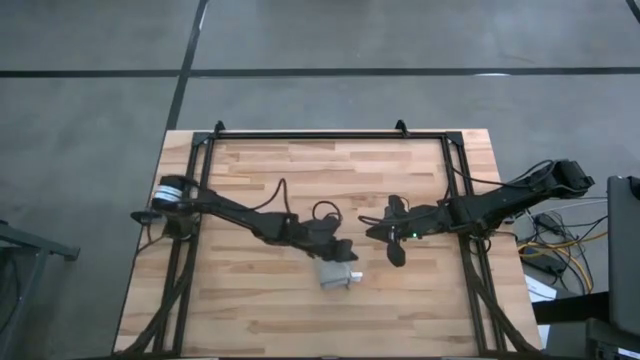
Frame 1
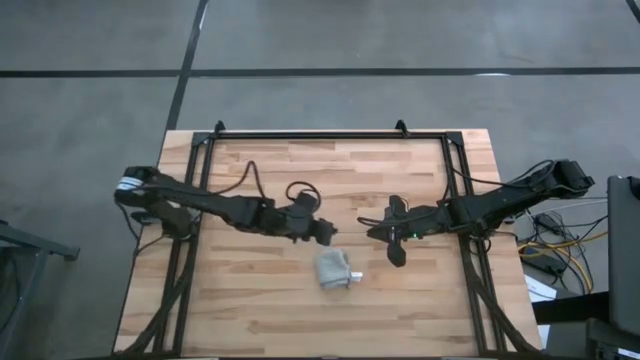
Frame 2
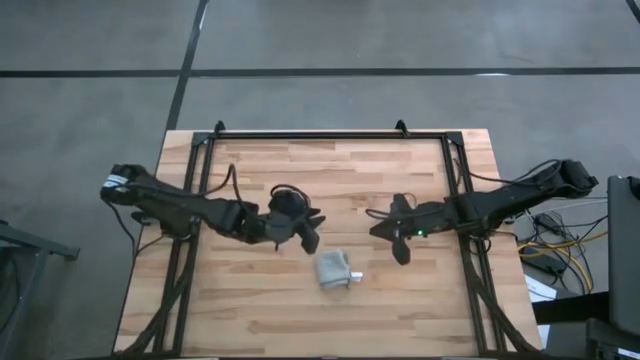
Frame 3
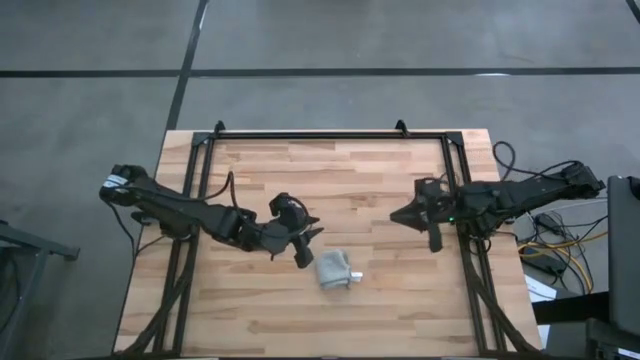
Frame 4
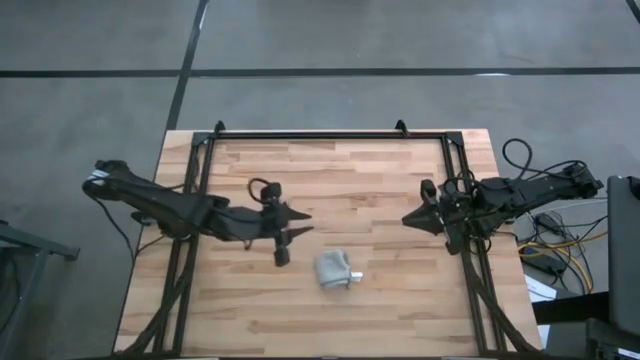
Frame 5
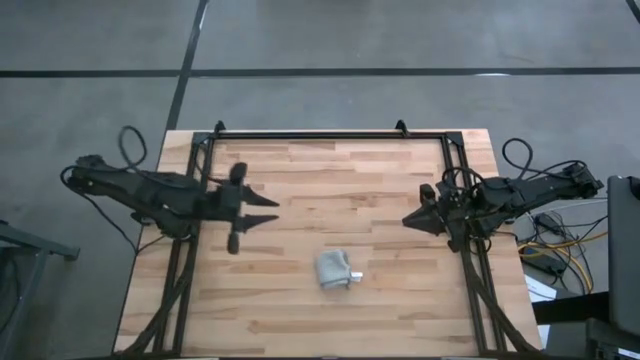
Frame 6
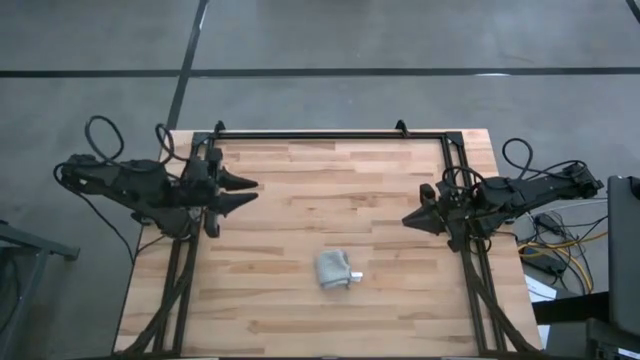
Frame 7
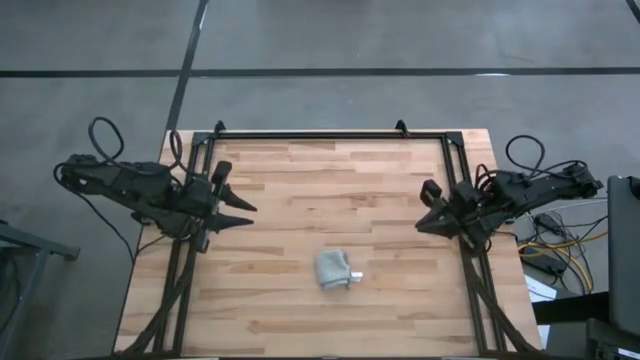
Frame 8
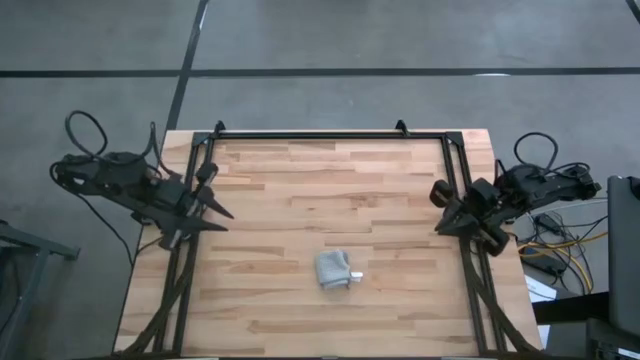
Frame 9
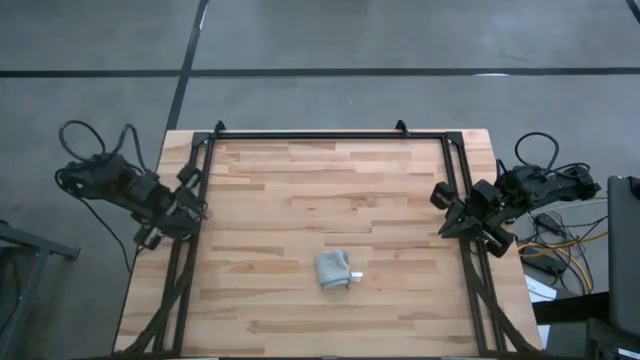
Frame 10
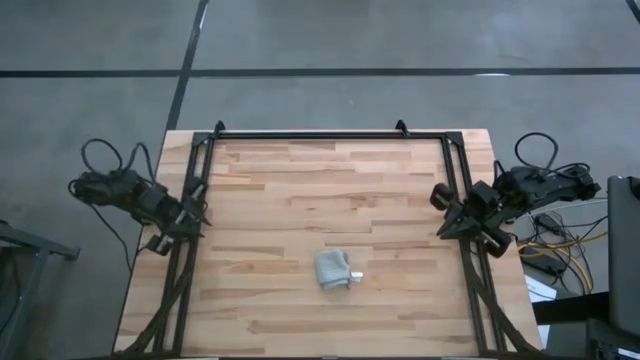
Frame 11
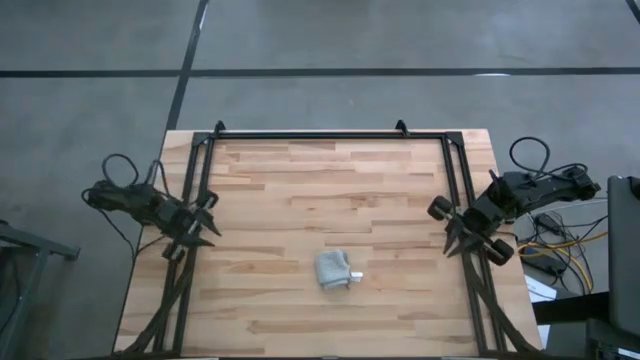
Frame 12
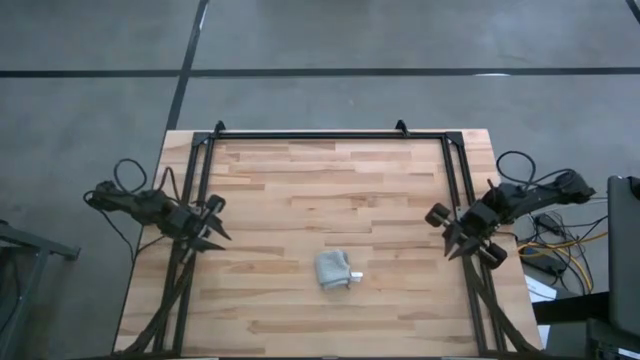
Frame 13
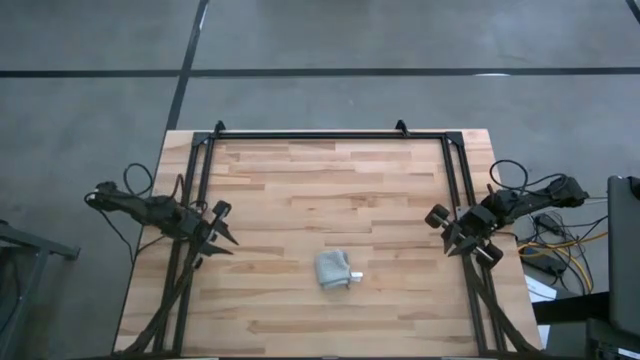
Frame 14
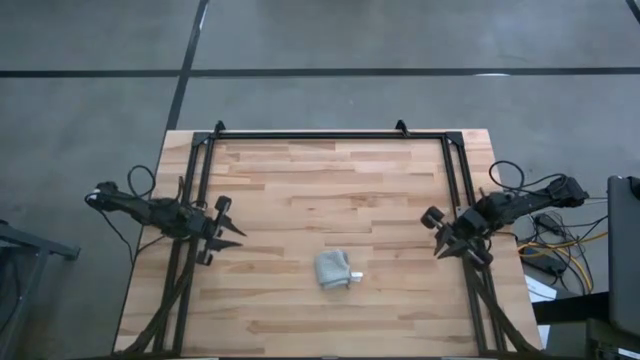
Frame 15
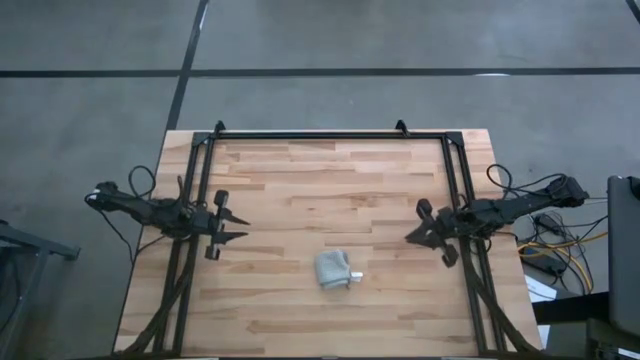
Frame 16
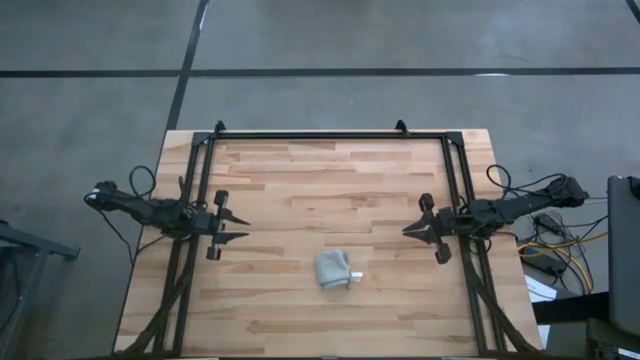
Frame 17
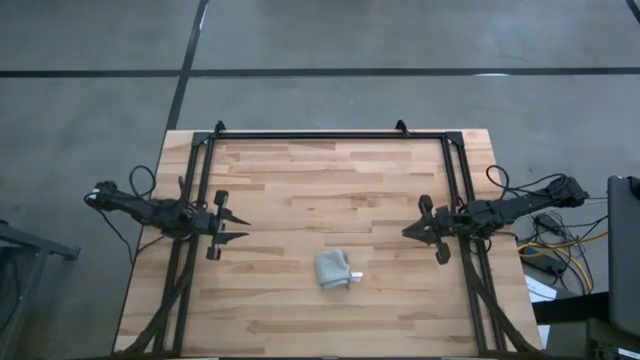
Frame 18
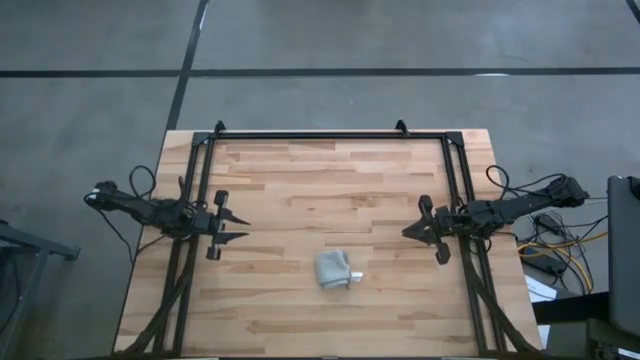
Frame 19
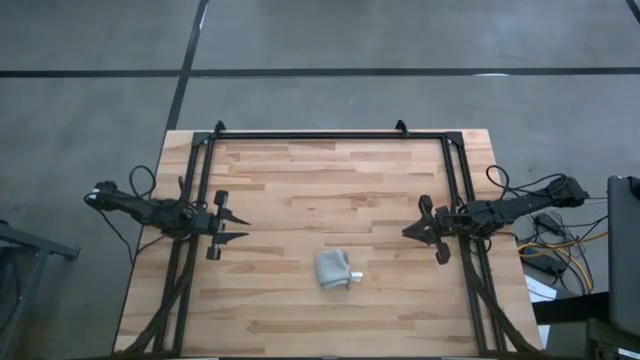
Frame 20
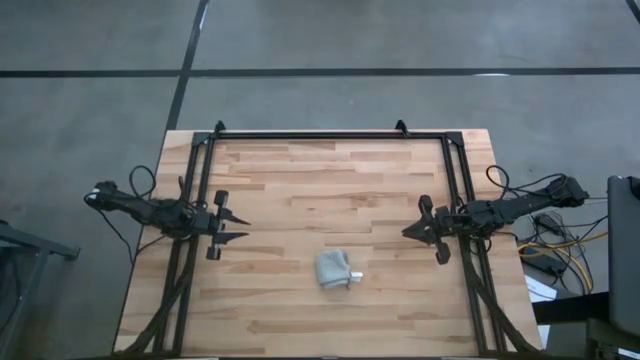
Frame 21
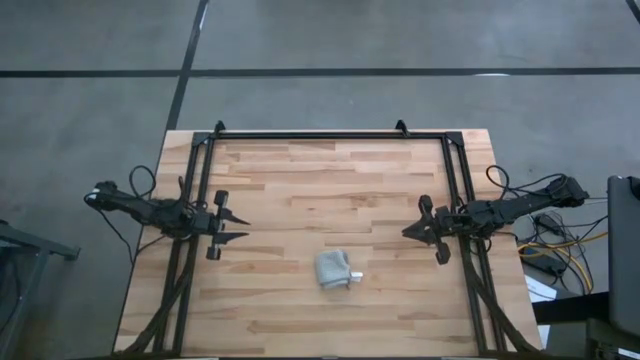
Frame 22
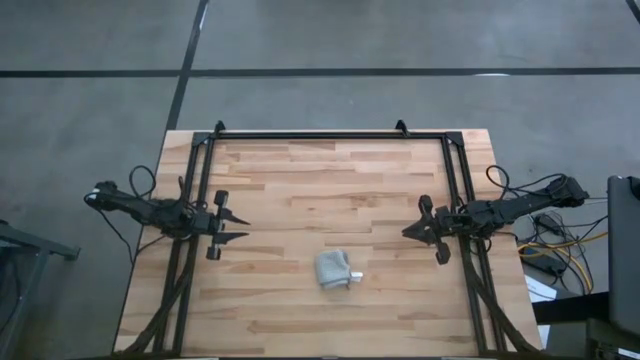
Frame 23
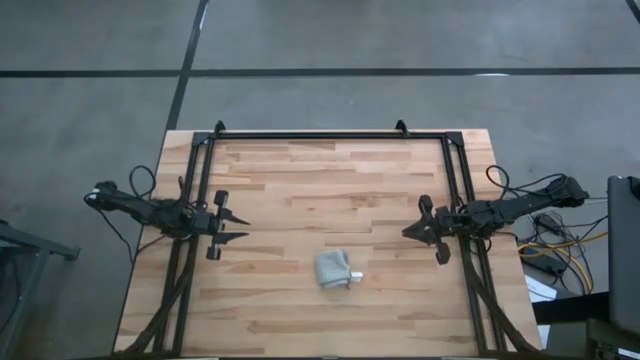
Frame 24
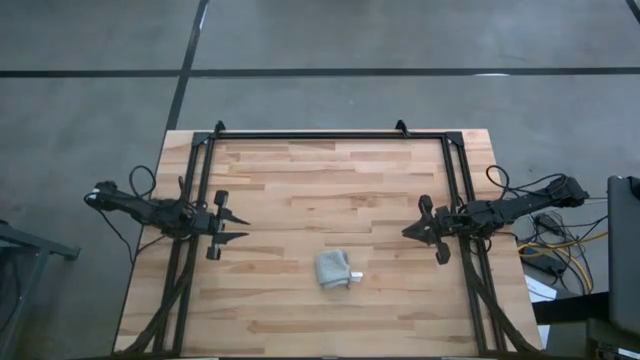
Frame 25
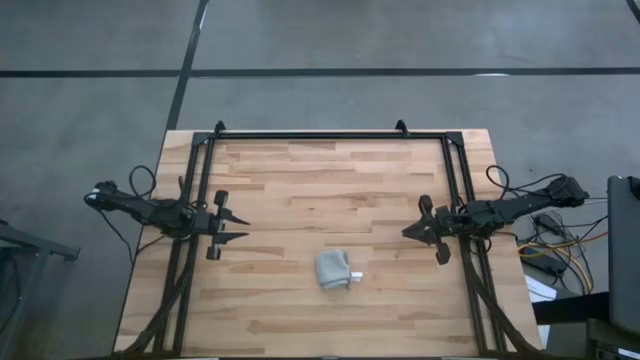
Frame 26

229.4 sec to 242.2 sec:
Task: Fold microfiber towels
Return to Home Position

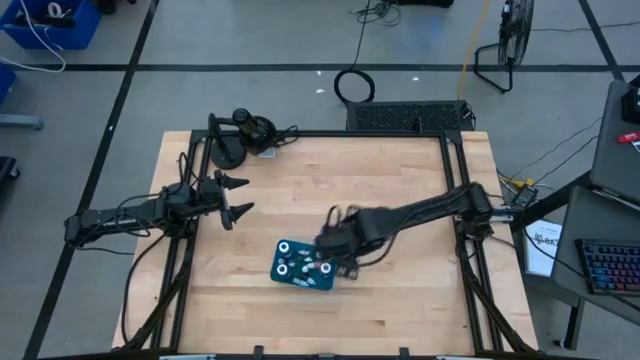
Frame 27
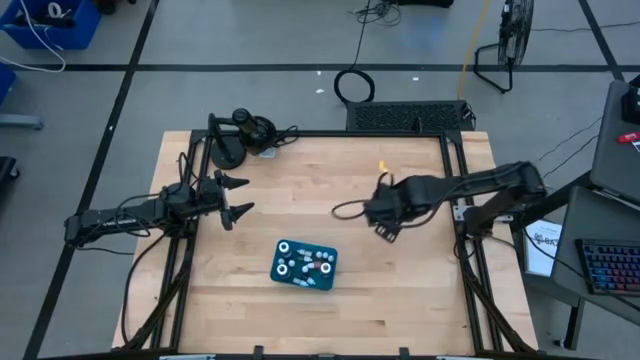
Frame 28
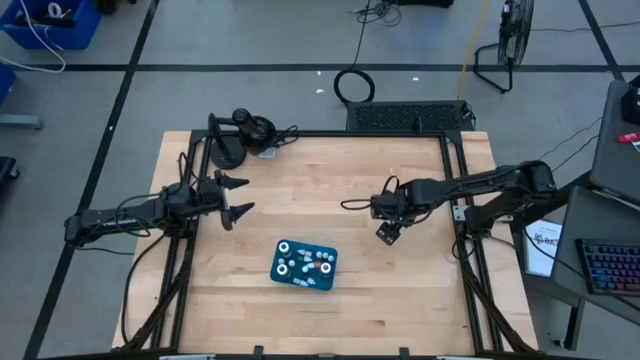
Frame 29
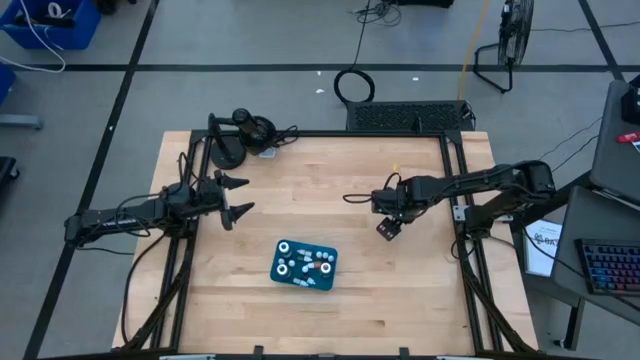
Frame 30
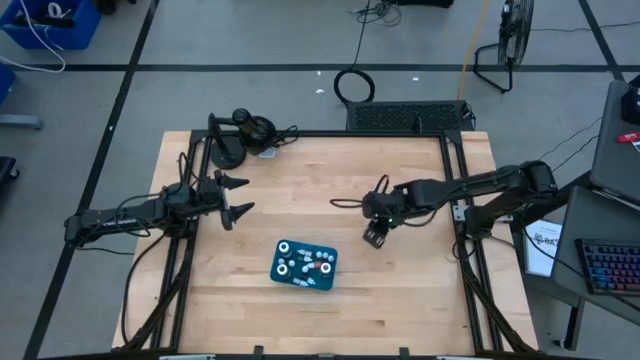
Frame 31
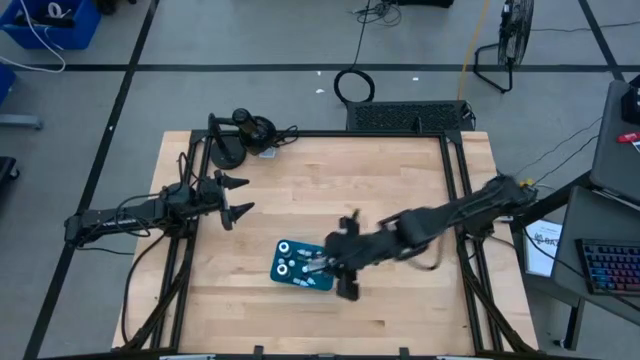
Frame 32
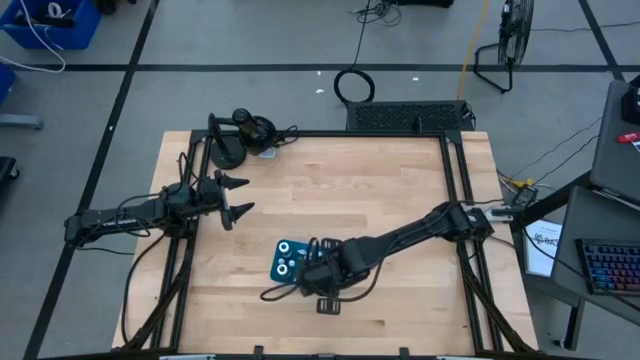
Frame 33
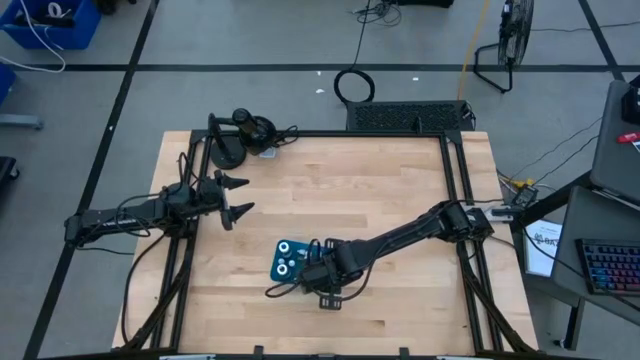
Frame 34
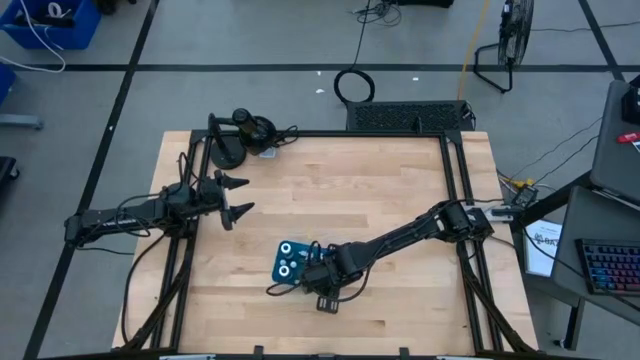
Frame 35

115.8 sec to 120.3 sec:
Task: Pick & Place food coloring
Put the large green coloring bottle into the blue bin

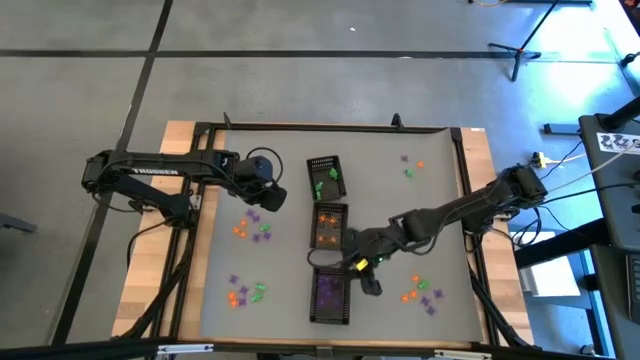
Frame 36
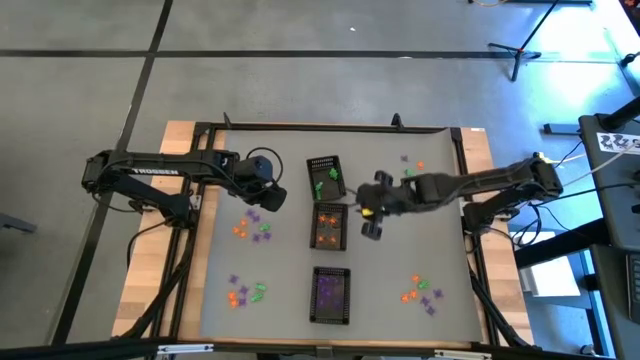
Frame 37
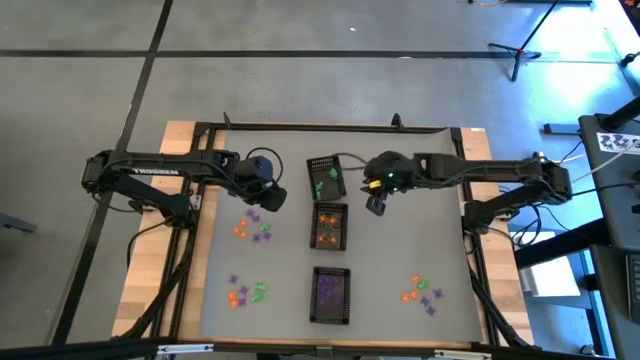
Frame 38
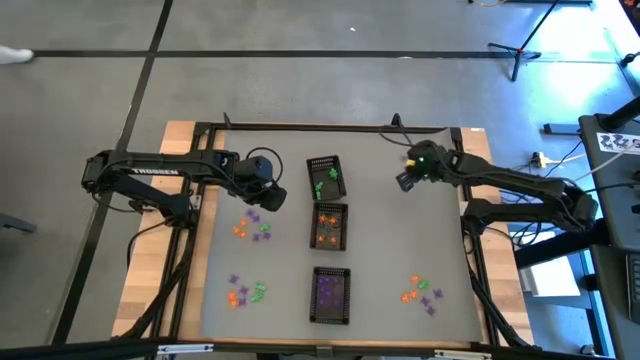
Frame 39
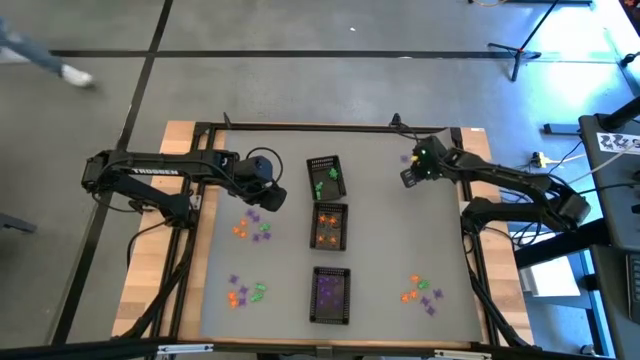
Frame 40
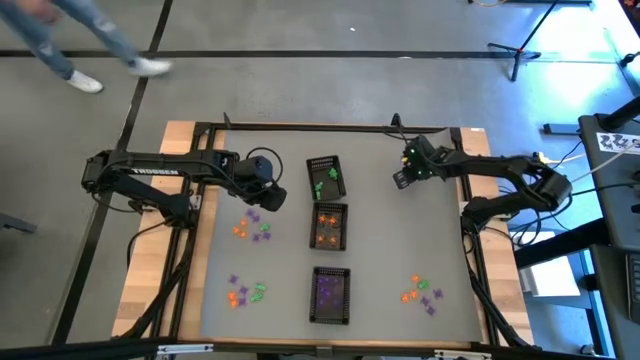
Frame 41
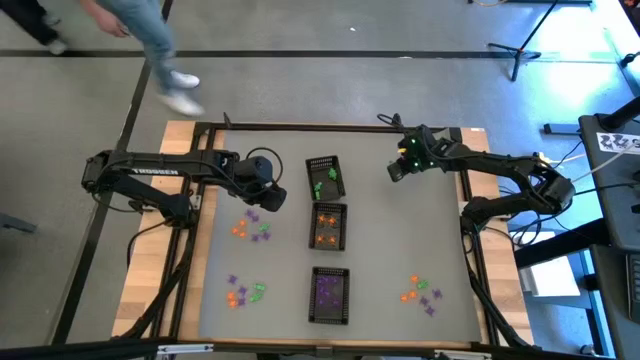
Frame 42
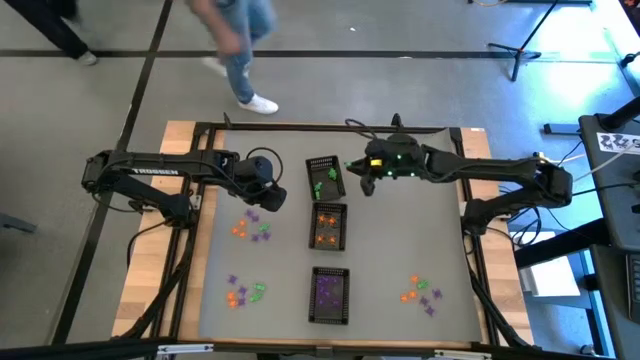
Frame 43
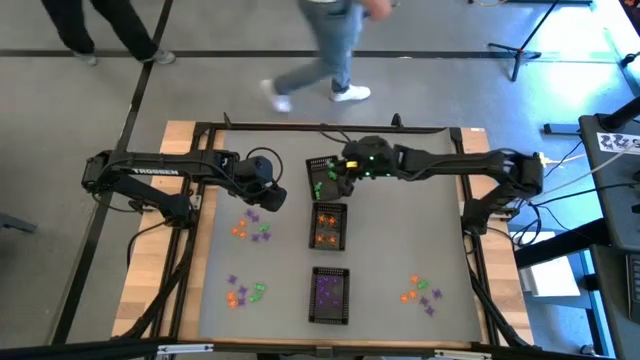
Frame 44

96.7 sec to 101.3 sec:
Task: Sort Halloween decoration
Put the green skeleton toy into the top black bin
